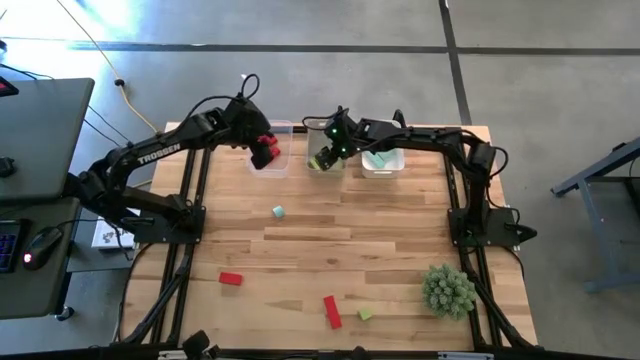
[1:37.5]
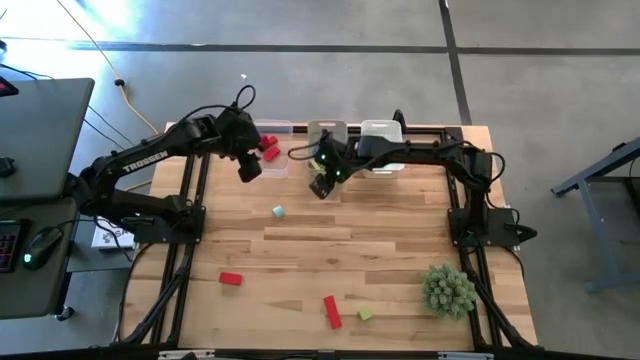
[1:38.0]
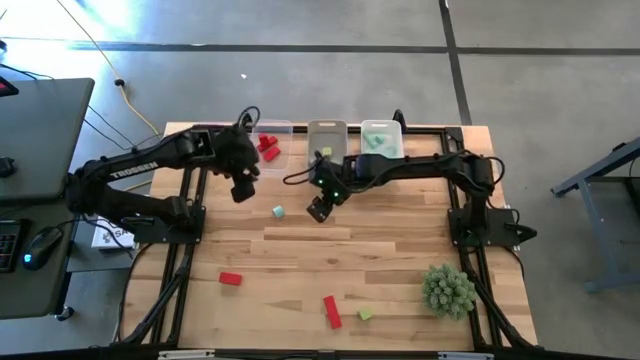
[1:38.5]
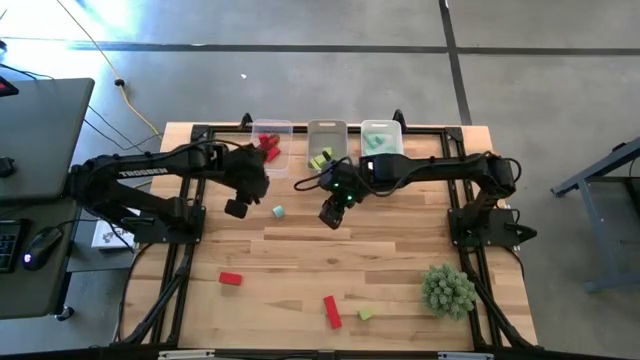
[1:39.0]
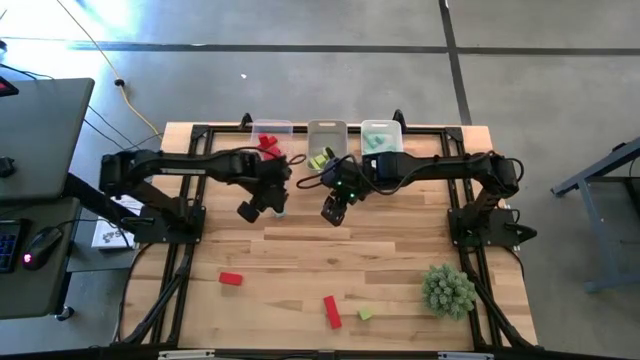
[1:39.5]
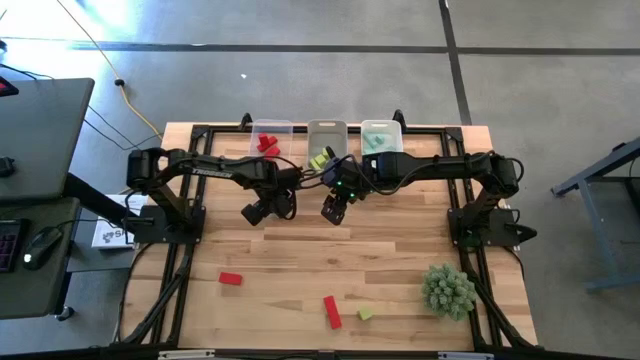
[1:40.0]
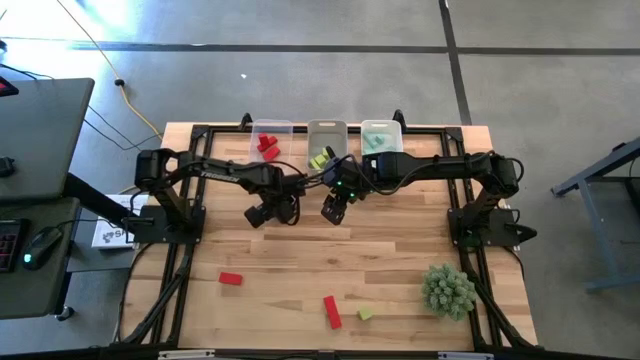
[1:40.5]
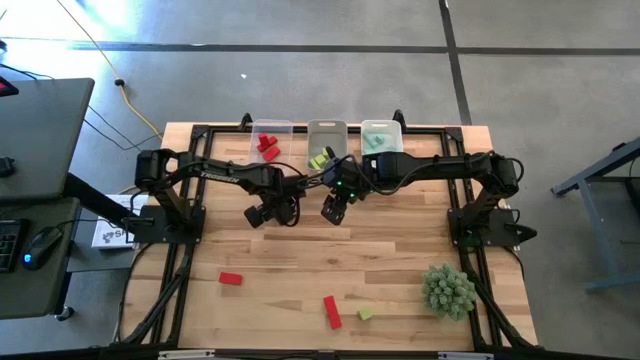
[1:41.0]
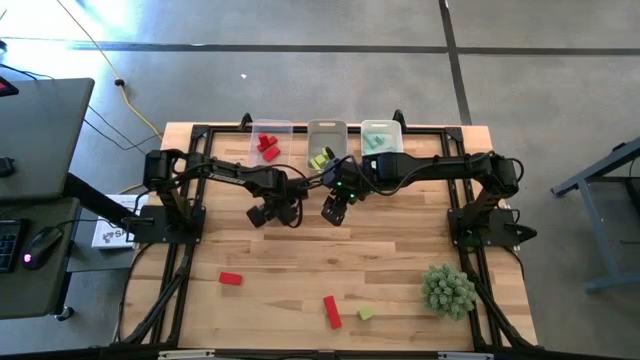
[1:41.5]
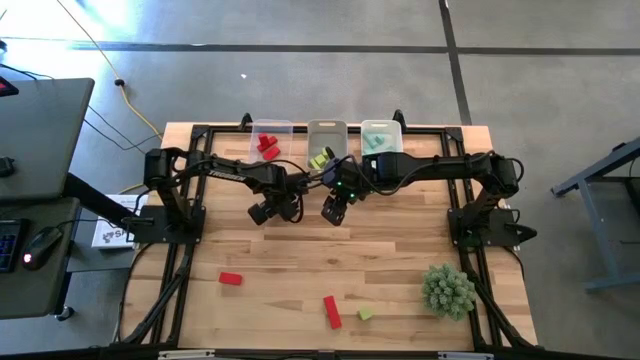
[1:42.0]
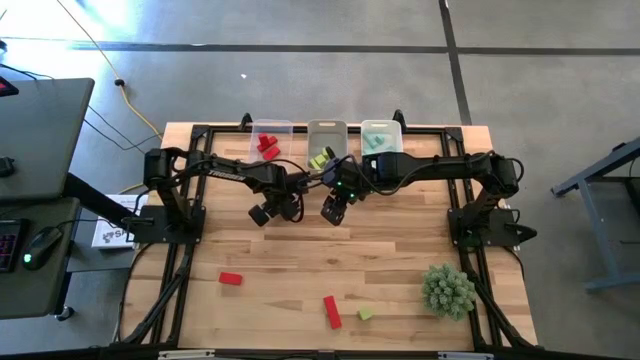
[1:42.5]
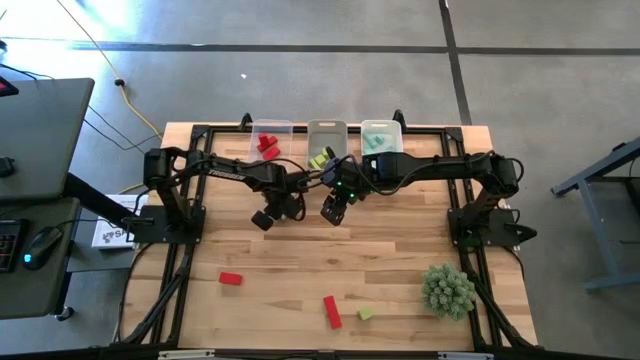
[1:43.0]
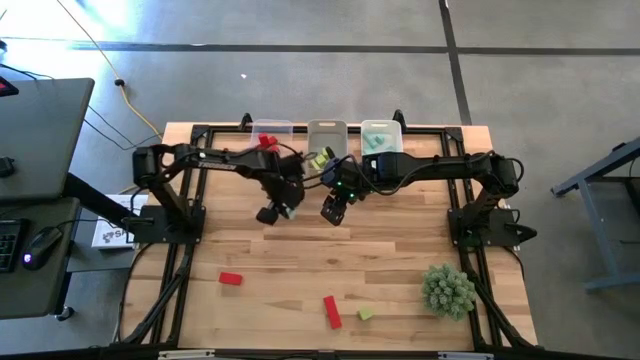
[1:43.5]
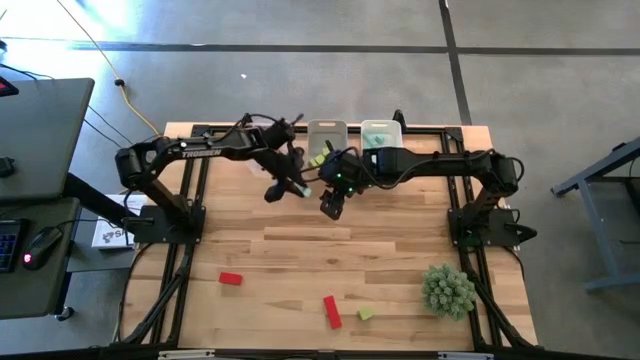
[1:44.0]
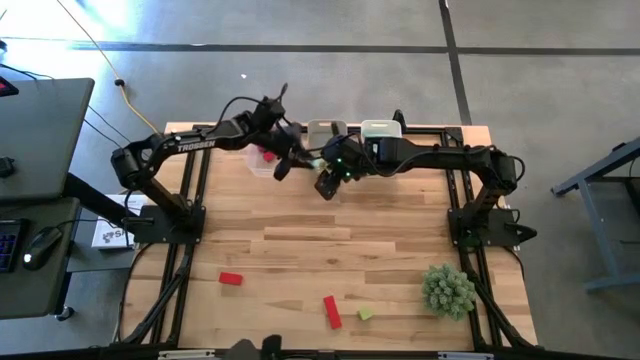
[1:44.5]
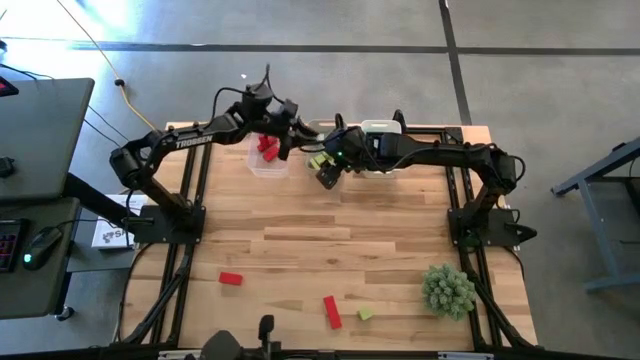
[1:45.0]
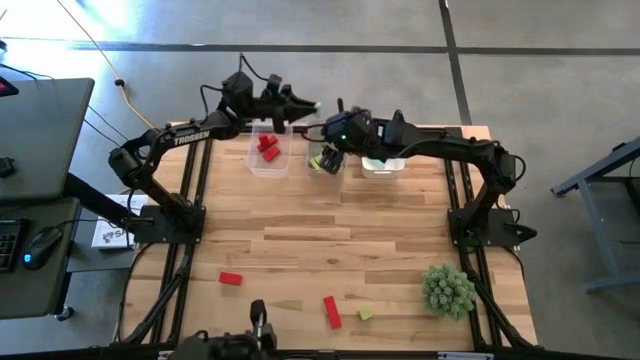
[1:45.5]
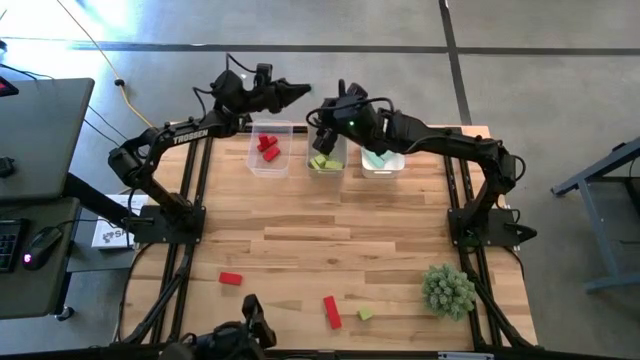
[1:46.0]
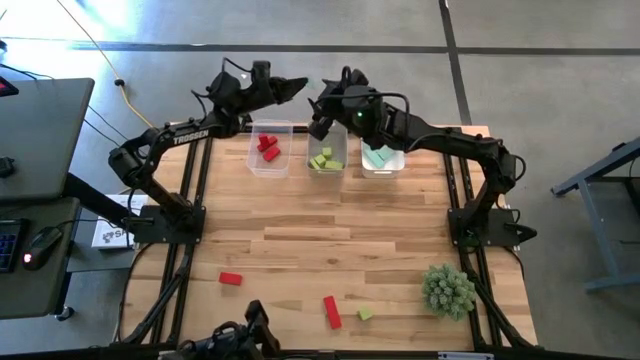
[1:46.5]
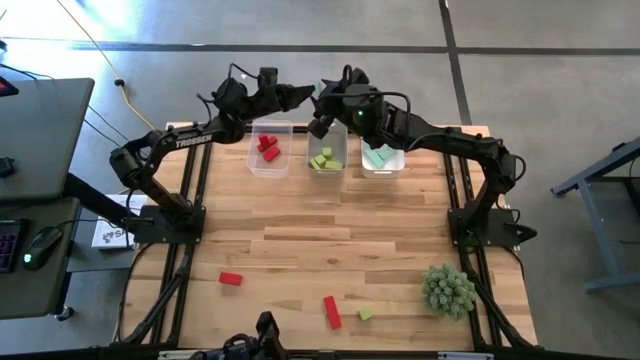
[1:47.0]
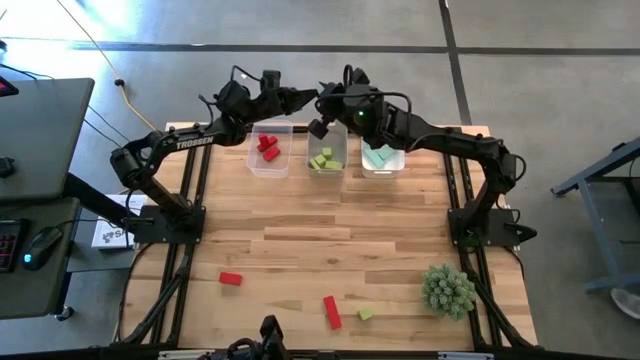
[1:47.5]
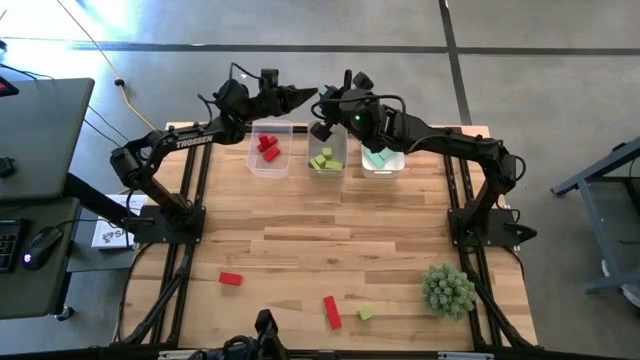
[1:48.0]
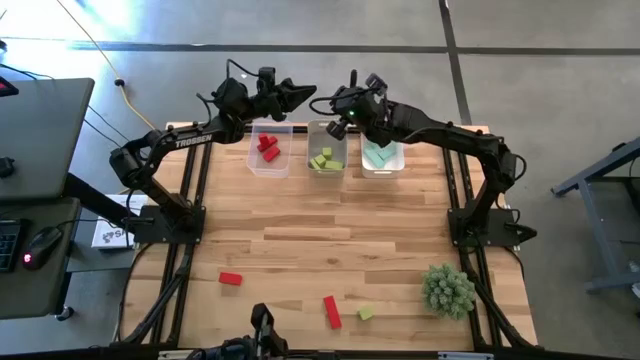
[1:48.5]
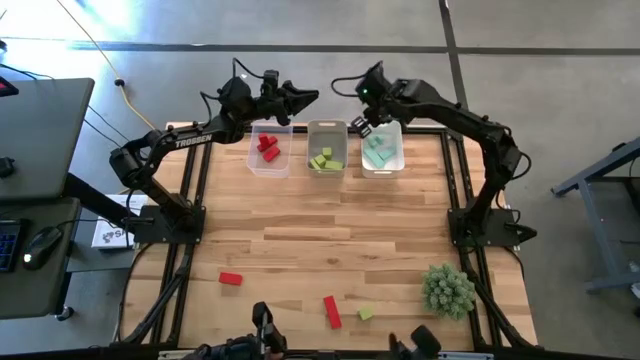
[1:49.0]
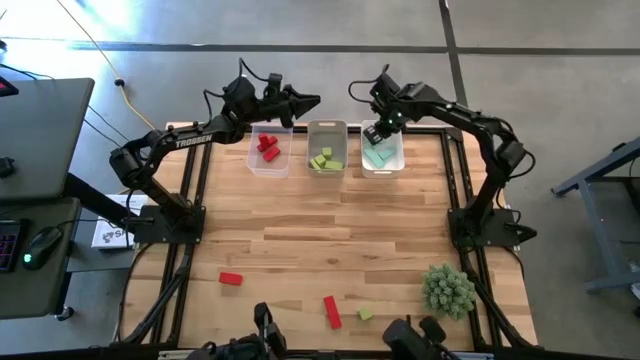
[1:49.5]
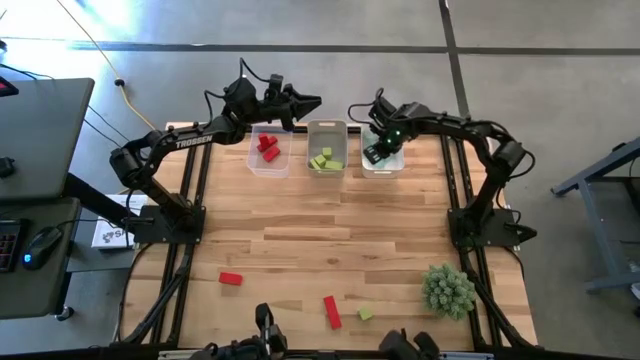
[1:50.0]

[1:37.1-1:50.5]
Task: Sort & place blocks by color
Put the blue block into the white bin

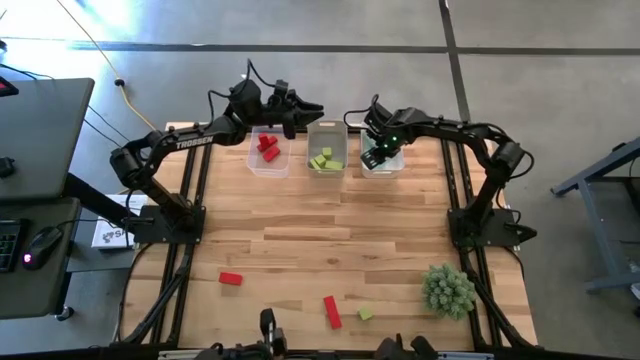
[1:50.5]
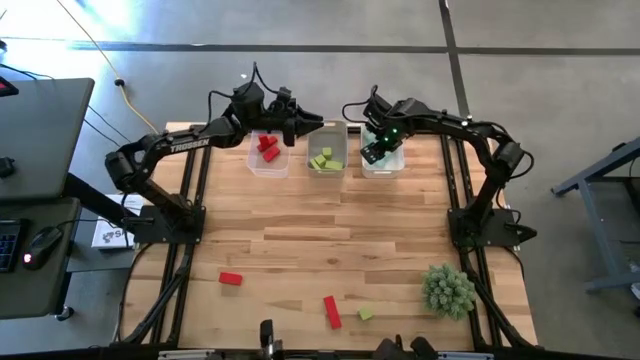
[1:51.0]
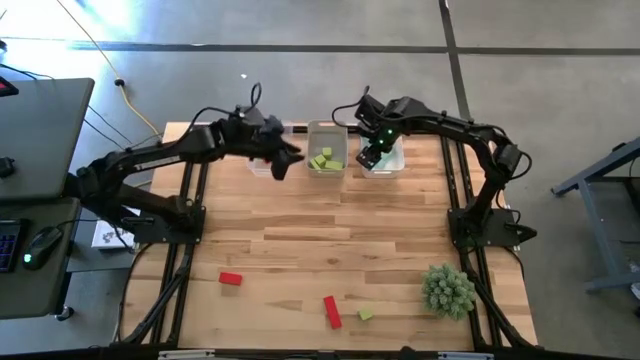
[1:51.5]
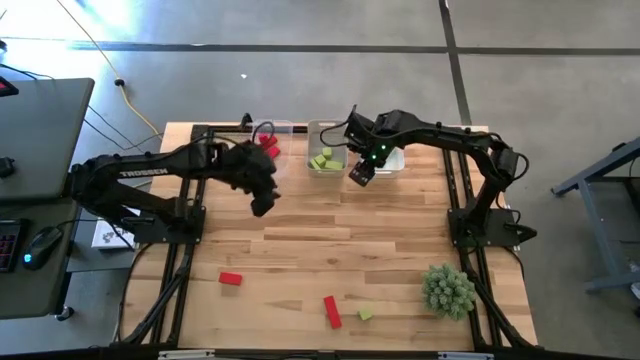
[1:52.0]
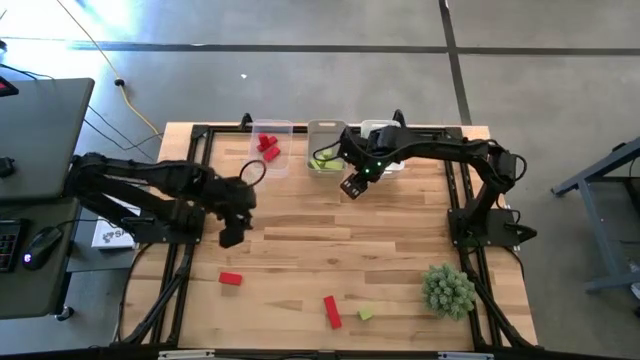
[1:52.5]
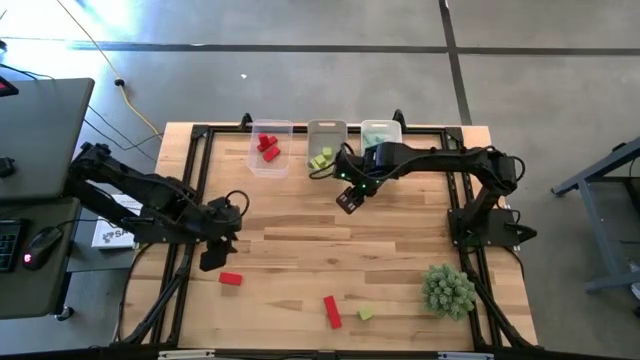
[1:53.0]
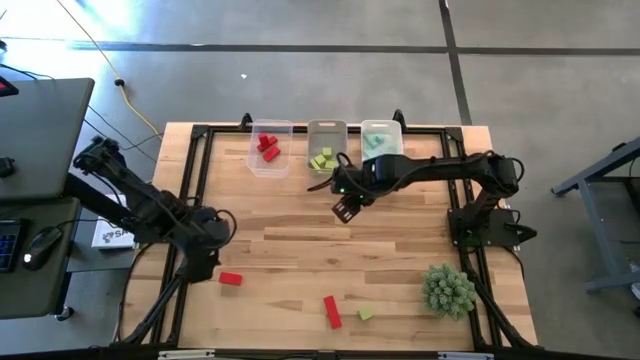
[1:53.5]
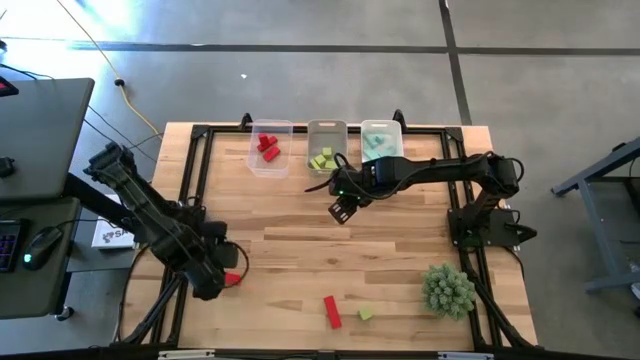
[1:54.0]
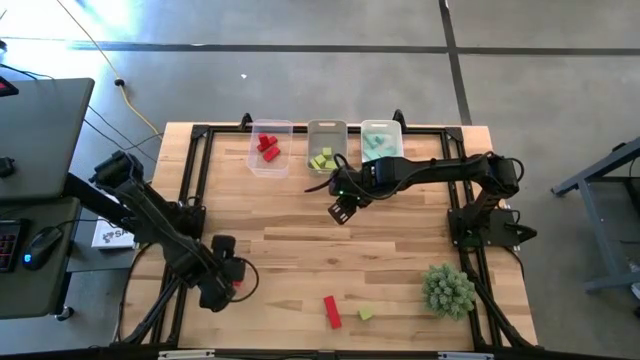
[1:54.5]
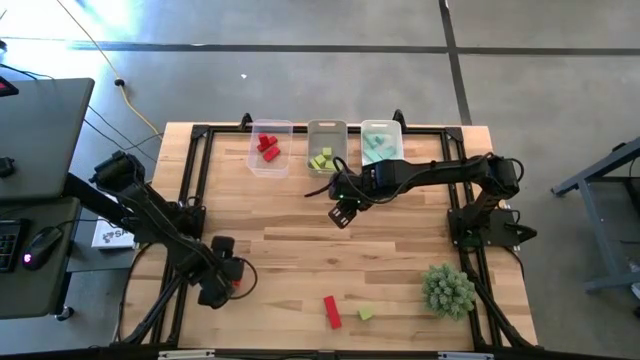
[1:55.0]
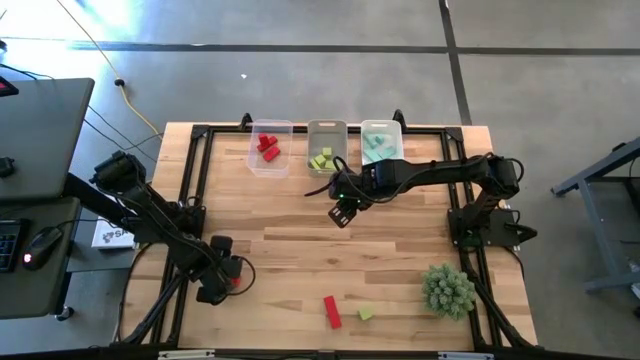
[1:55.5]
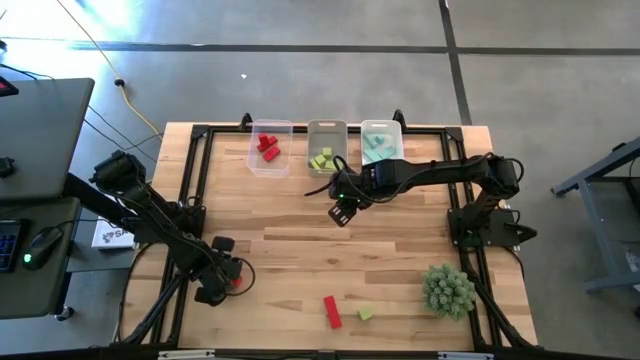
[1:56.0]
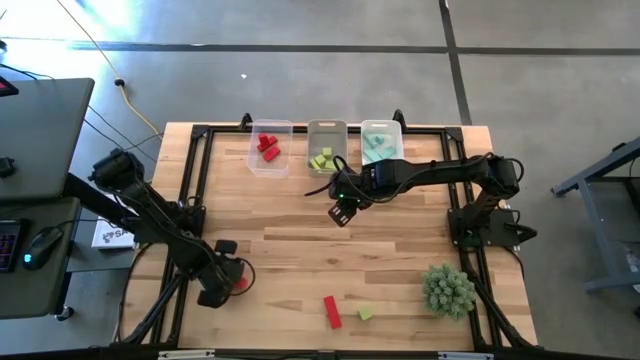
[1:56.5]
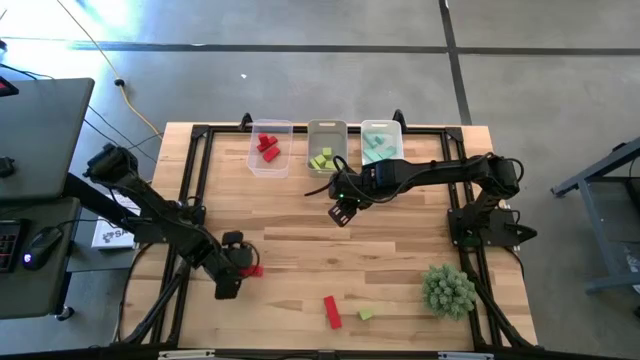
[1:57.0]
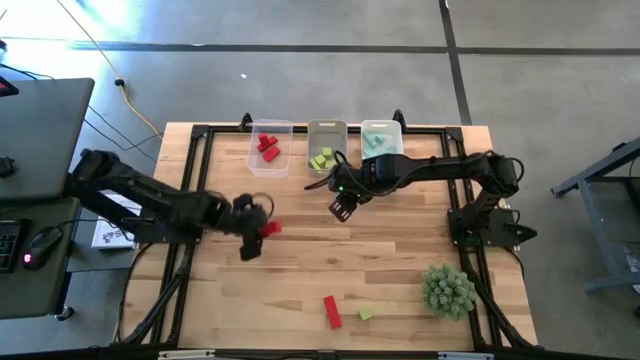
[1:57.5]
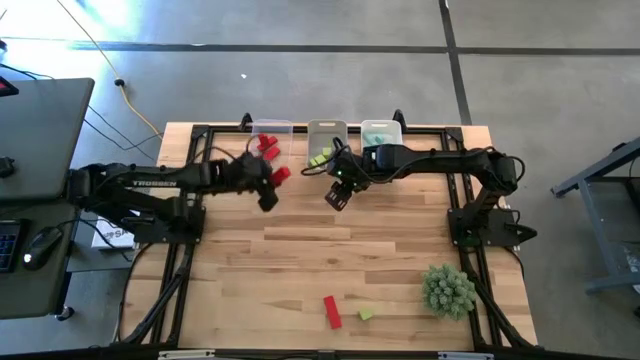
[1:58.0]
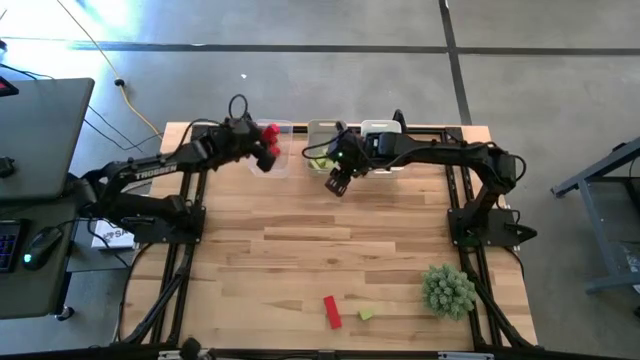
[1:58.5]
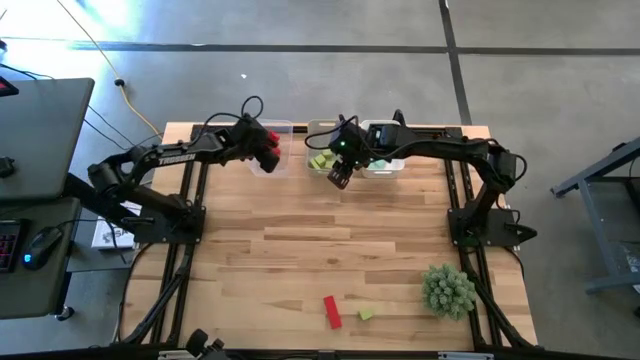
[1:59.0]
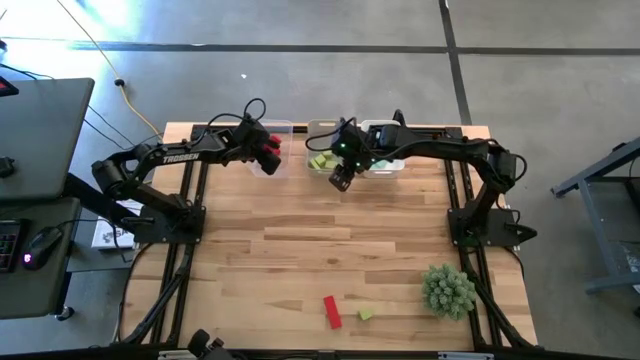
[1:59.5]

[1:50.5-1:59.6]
Put the red block into the transparent bin
